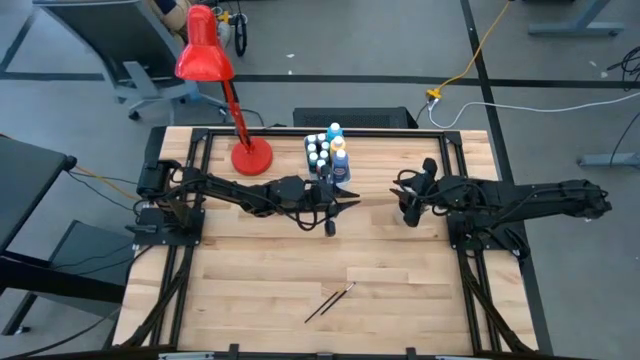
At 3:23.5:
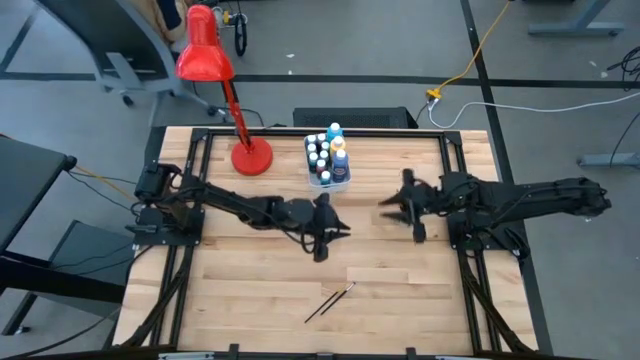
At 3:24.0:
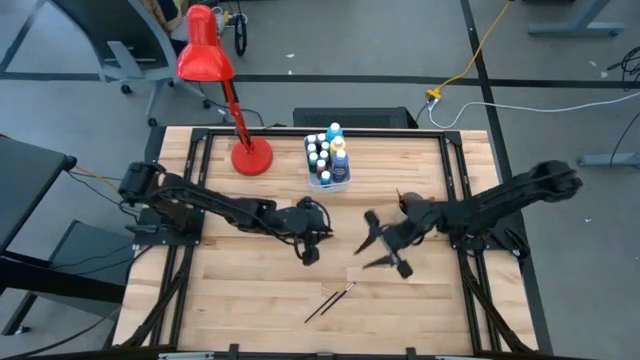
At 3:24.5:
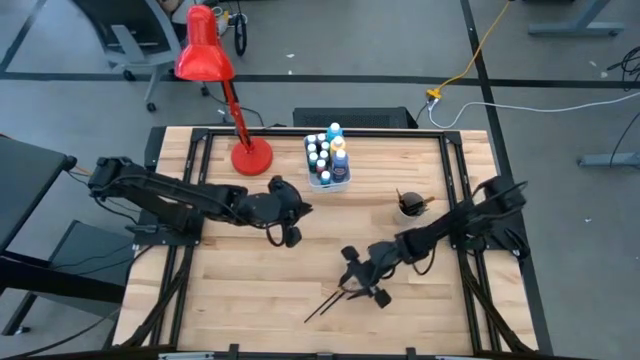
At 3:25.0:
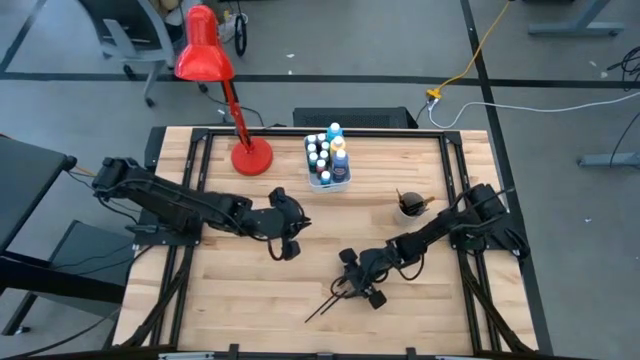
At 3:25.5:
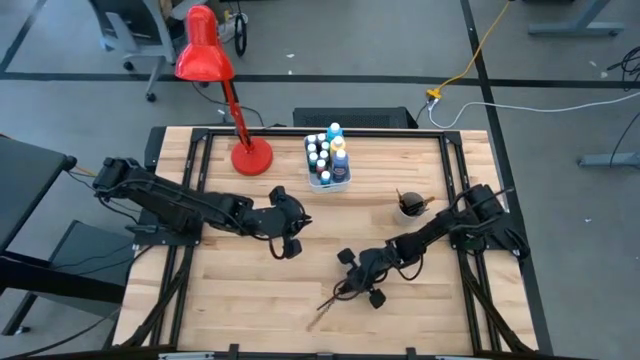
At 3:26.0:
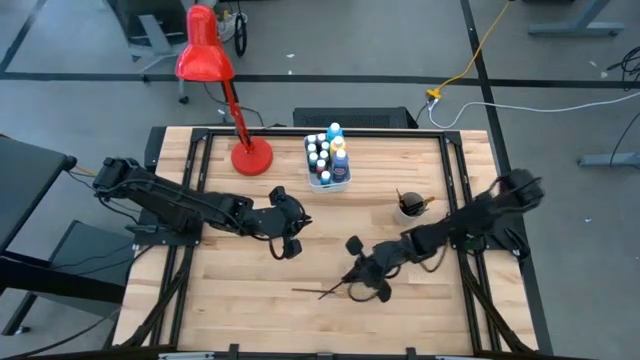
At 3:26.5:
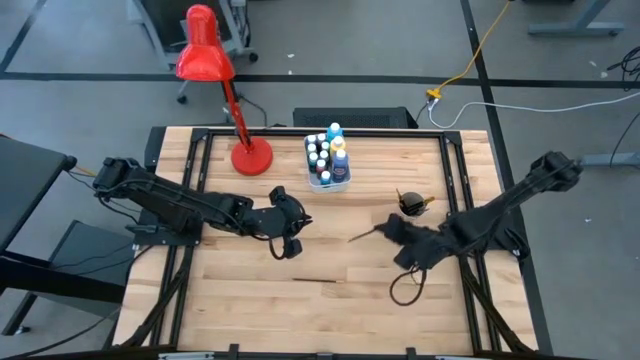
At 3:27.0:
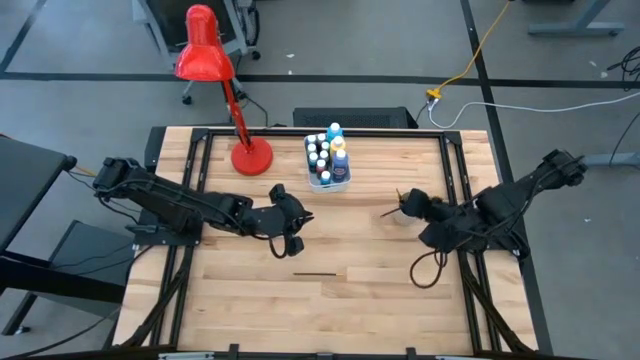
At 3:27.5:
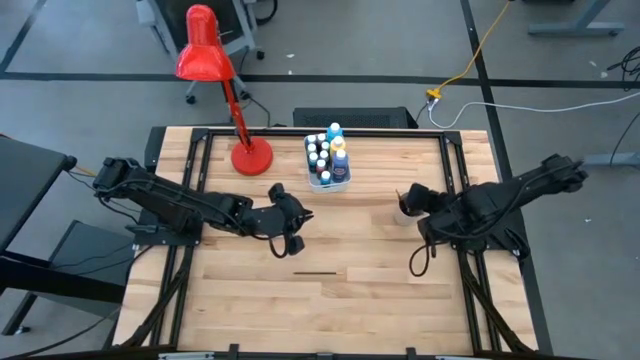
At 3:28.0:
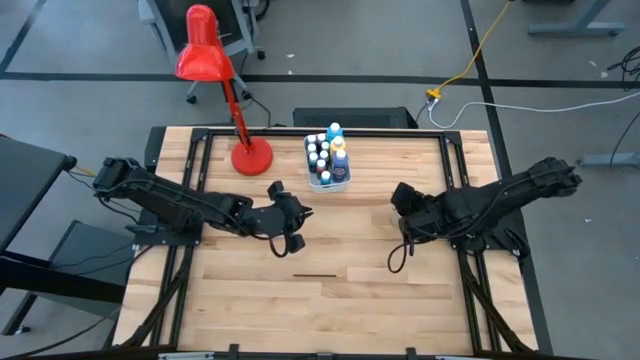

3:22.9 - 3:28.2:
Task: Pick & Place Paint Supplies
Put the silver paint brush into the gray cup

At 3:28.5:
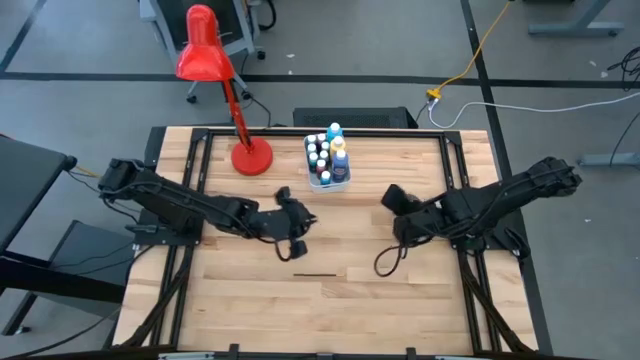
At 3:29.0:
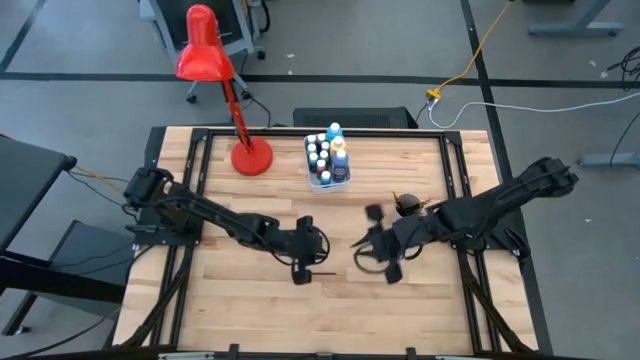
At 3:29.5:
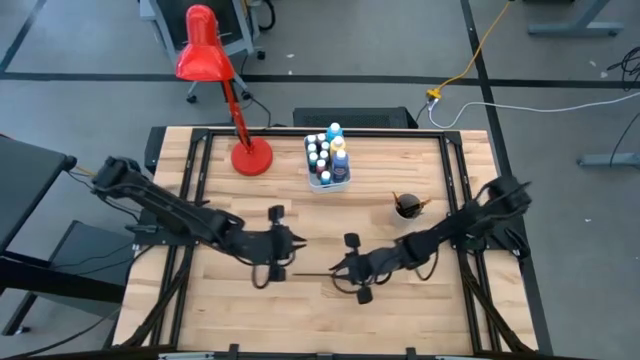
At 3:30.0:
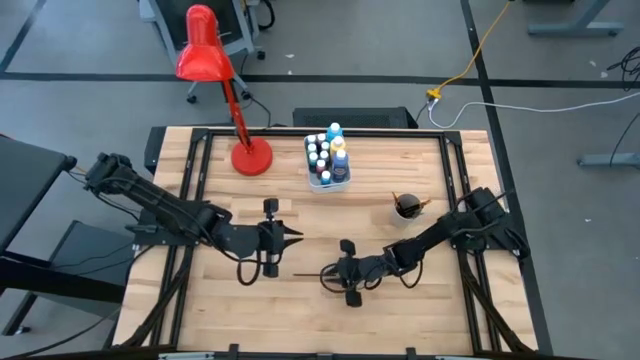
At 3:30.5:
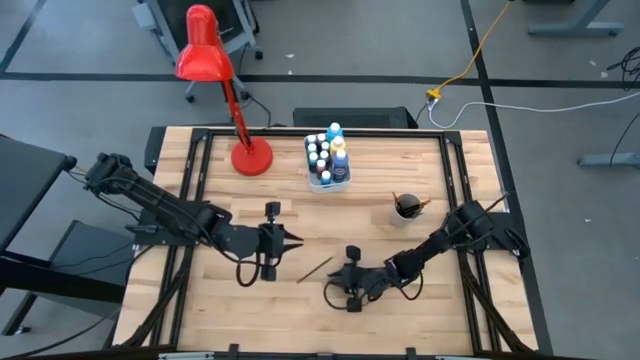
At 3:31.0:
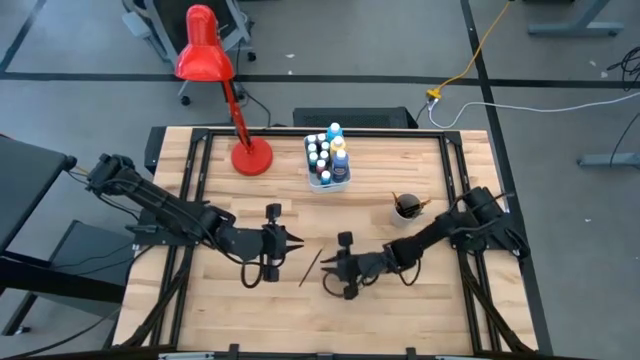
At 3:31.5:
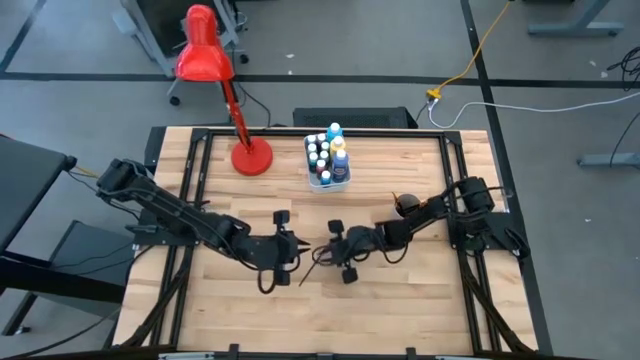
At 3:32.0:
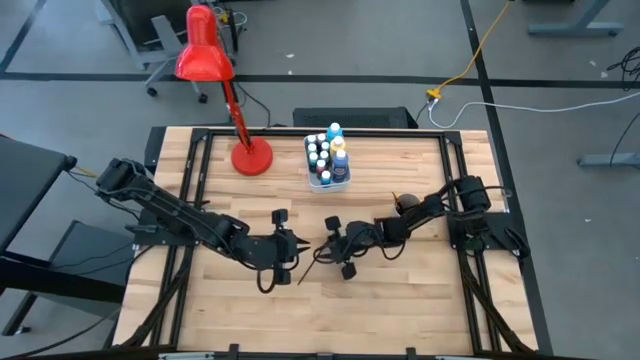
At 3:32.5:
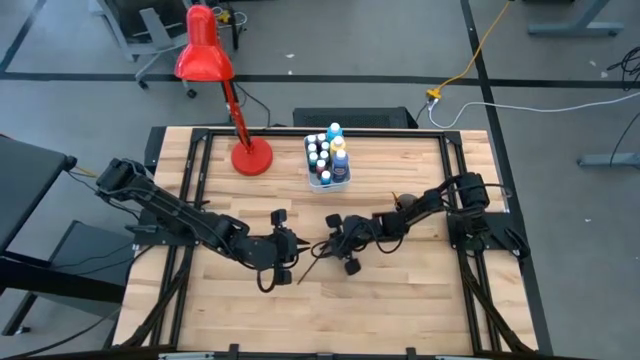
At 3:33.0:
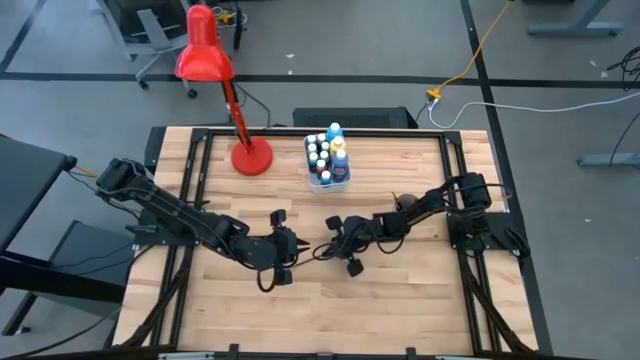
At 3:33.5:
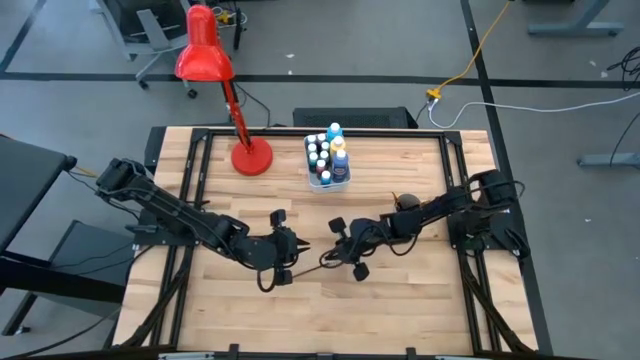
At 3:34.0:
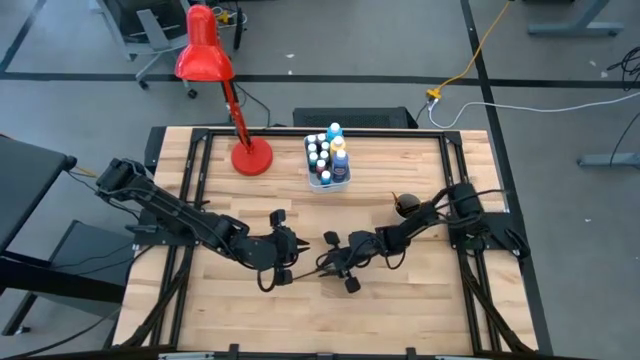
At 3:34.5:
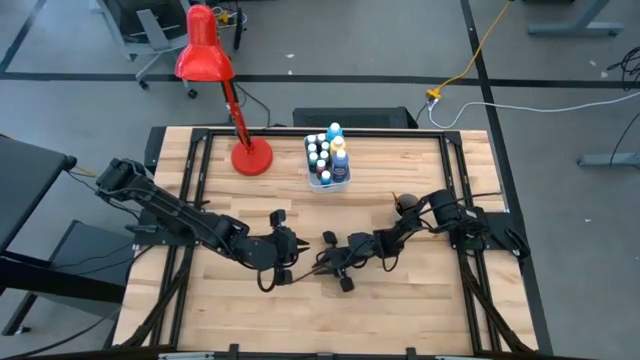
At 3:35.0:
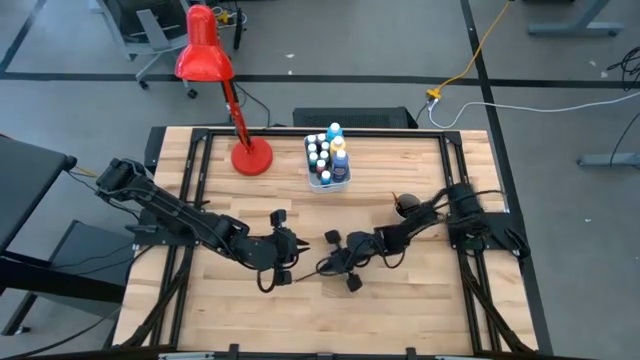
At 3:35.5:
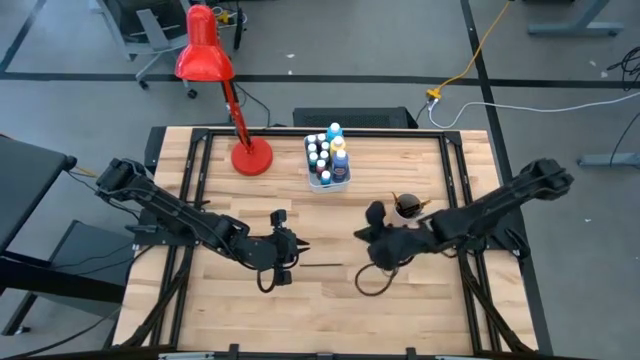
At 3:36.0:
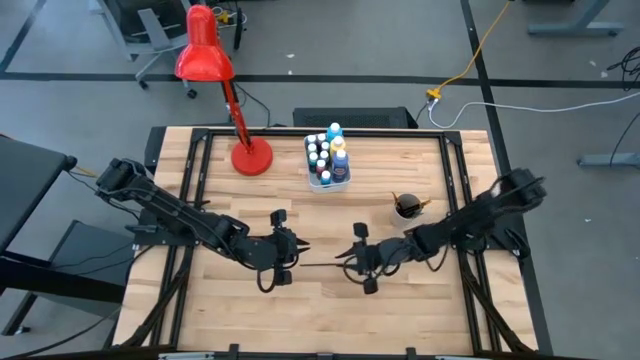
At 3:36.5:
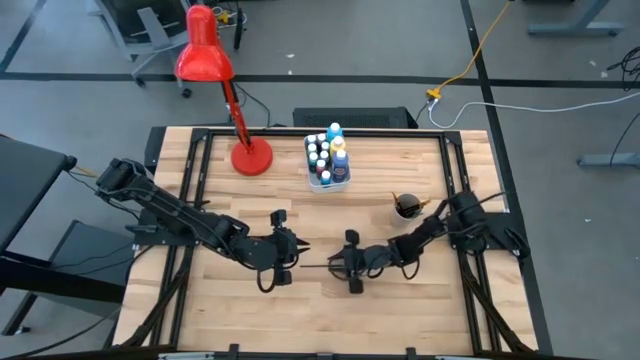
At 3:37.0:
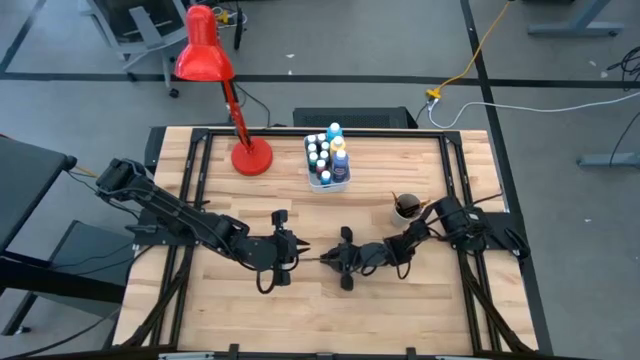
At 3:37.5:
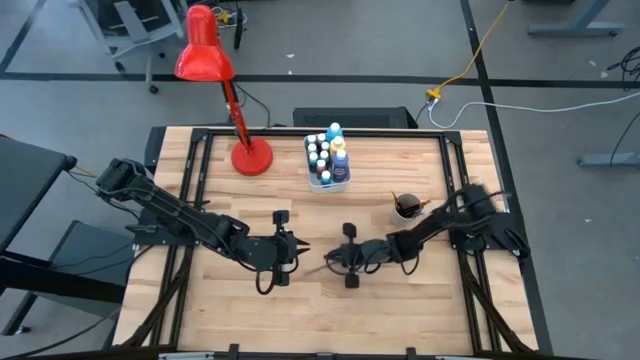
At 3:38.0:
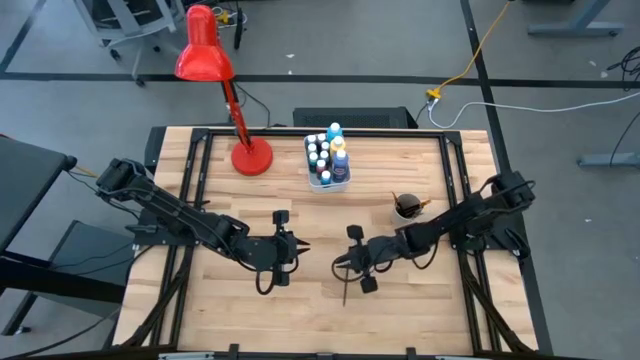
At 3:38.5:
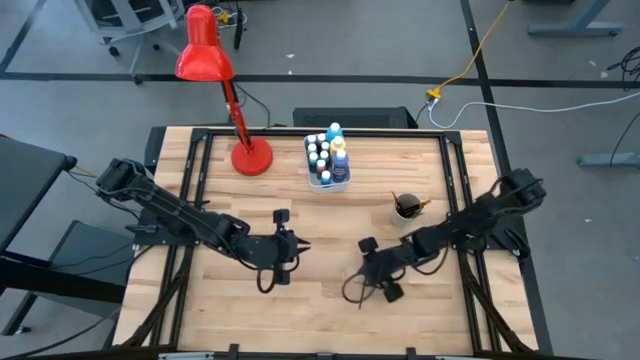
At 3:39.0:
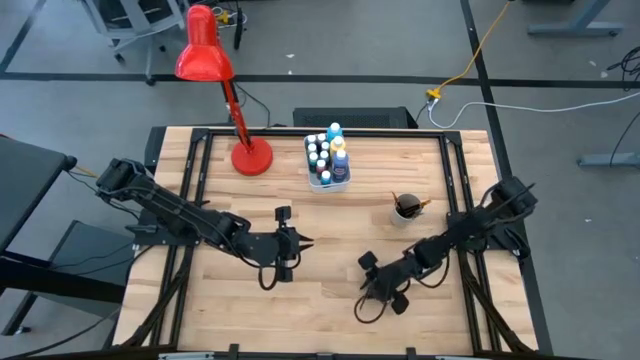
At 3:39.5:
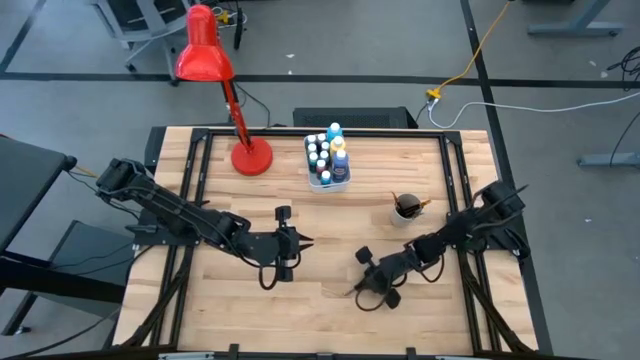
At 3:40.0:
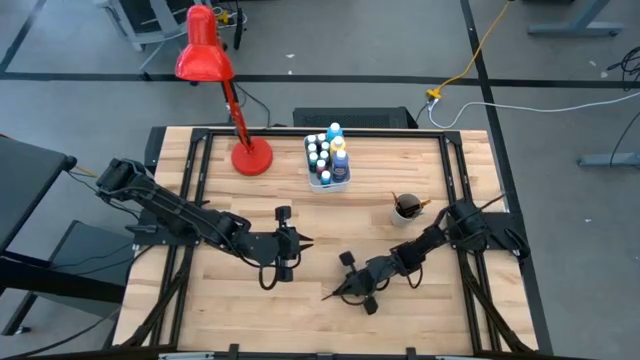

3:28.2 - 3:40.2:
Put the gold paint brush into the gray cup

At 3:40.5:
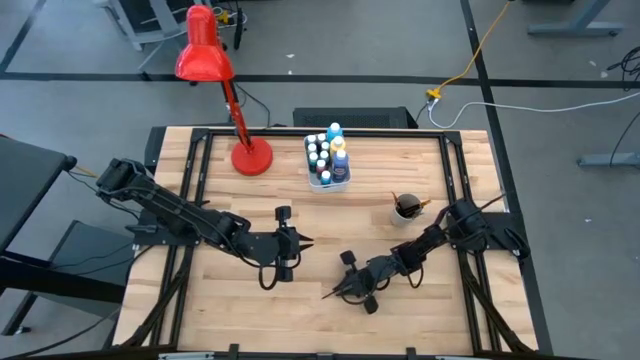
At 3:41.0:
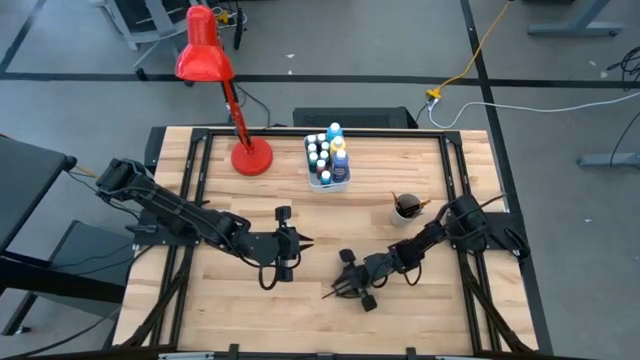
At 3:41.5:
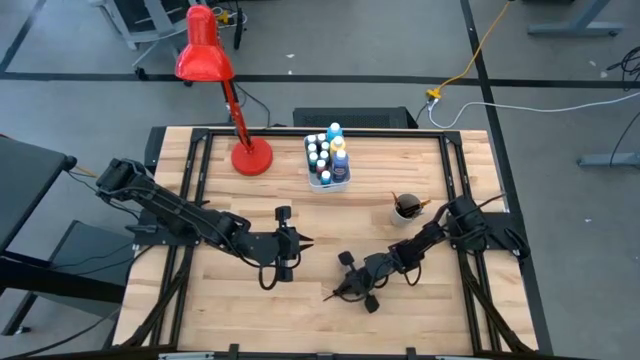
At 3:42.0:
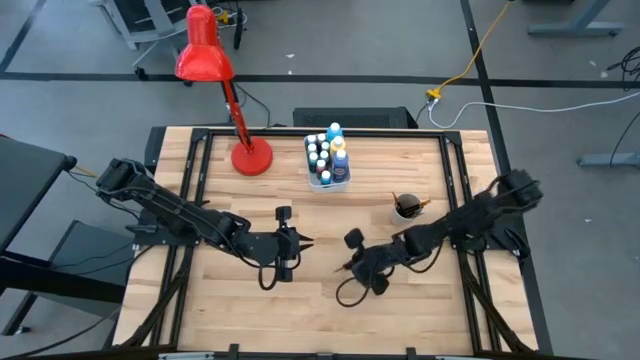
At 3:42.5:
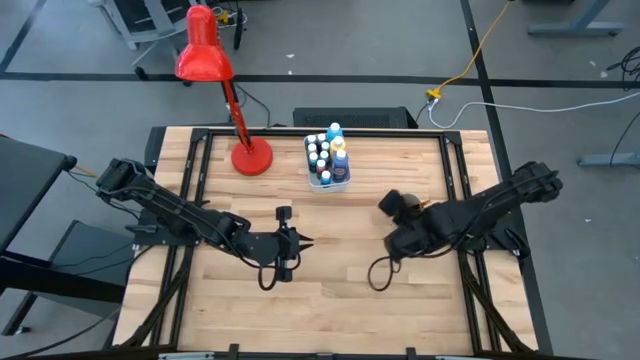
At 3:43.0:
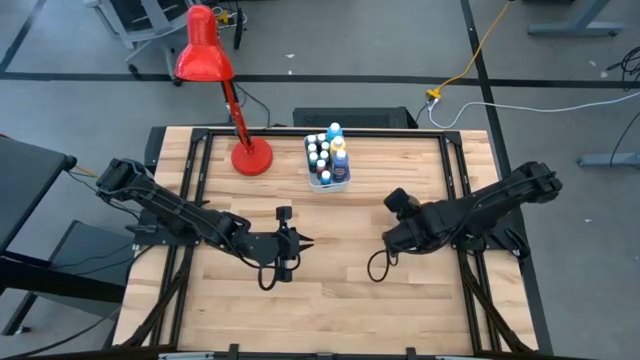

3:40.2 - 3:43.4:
Put the gold paint brush into the gray cup
